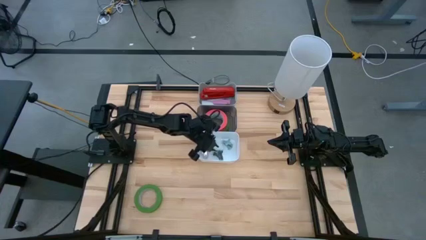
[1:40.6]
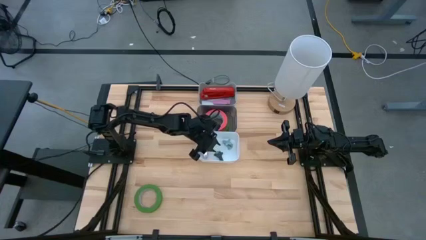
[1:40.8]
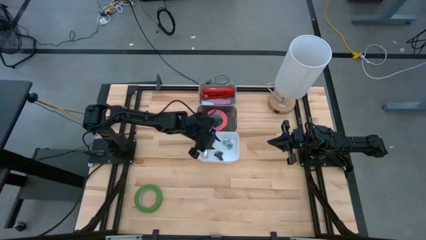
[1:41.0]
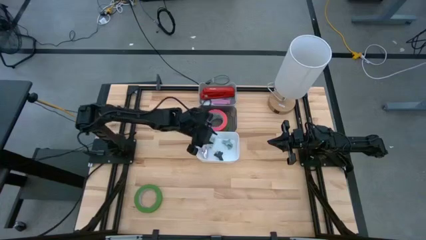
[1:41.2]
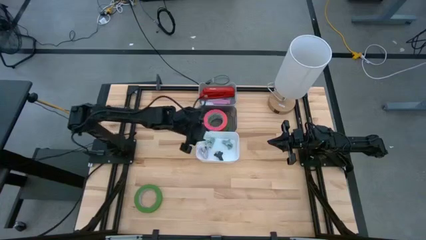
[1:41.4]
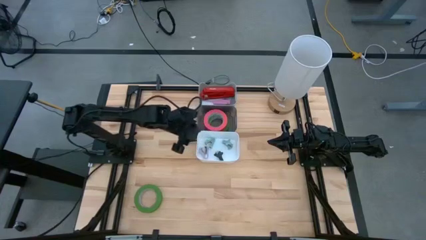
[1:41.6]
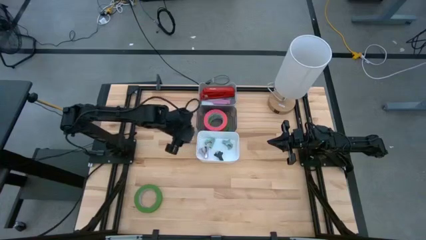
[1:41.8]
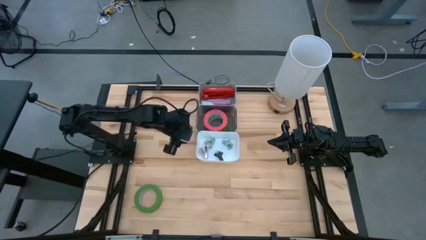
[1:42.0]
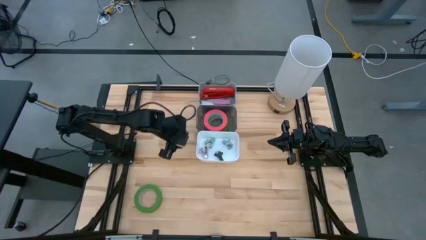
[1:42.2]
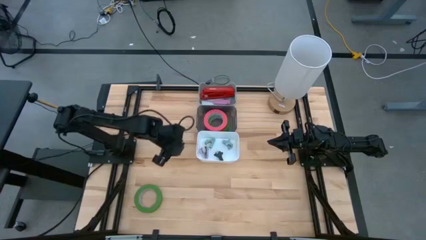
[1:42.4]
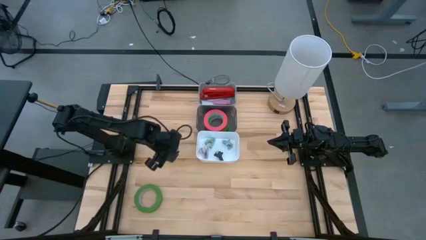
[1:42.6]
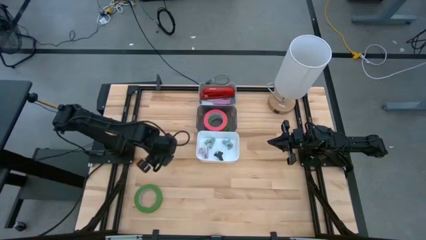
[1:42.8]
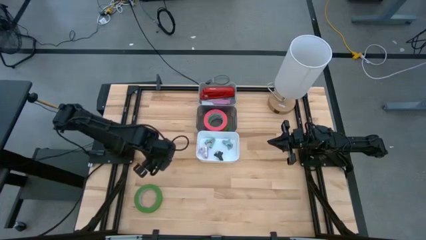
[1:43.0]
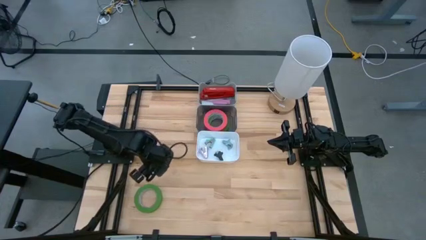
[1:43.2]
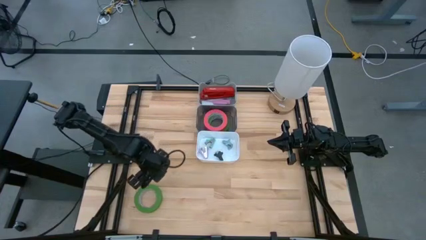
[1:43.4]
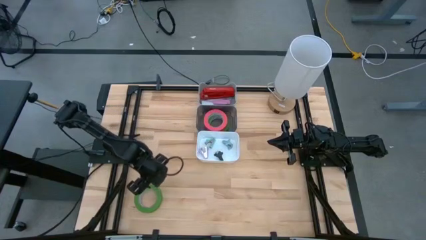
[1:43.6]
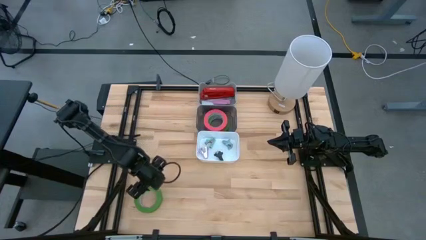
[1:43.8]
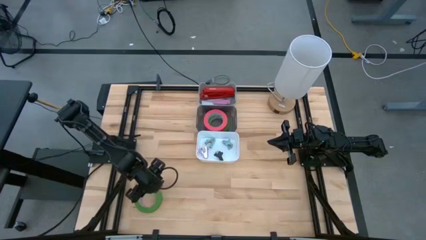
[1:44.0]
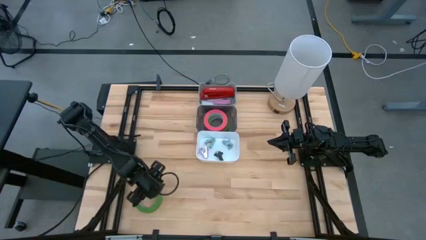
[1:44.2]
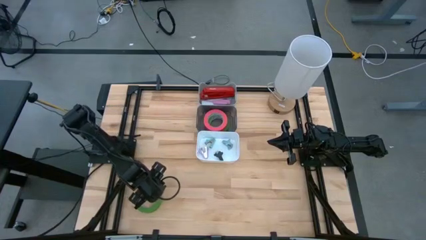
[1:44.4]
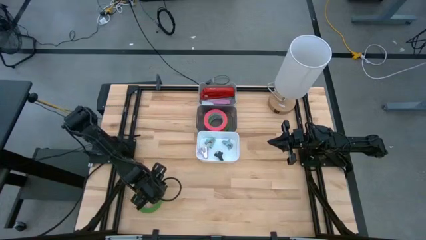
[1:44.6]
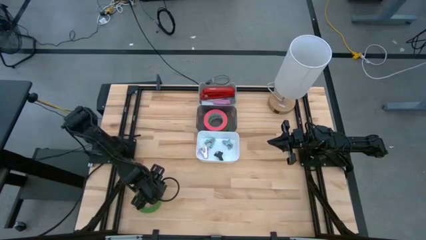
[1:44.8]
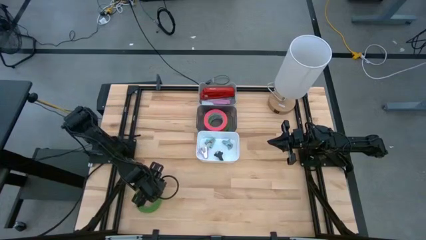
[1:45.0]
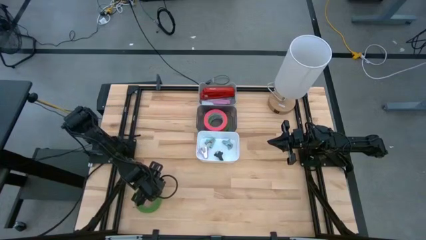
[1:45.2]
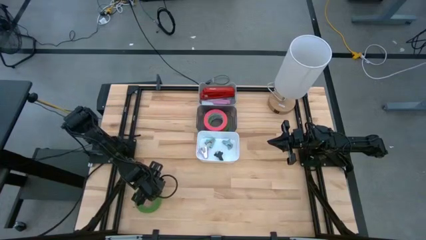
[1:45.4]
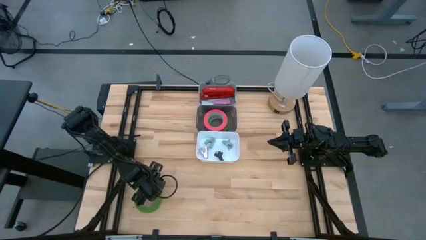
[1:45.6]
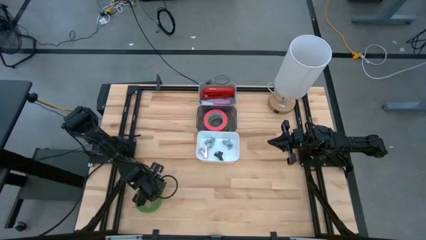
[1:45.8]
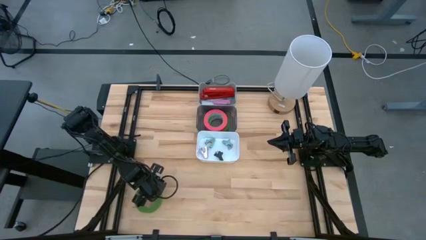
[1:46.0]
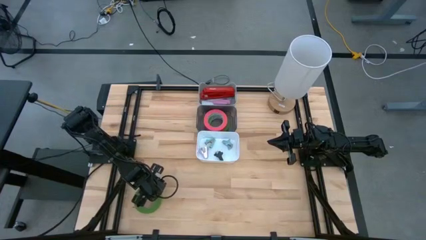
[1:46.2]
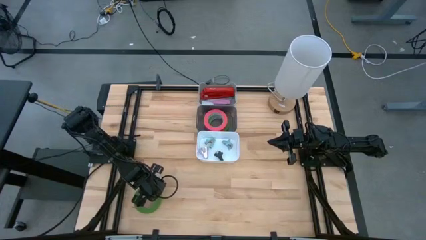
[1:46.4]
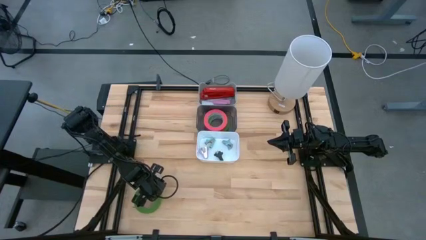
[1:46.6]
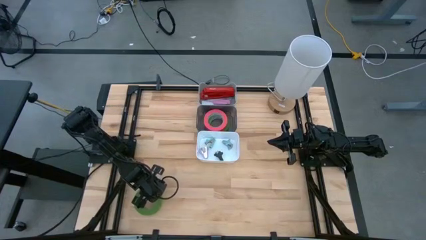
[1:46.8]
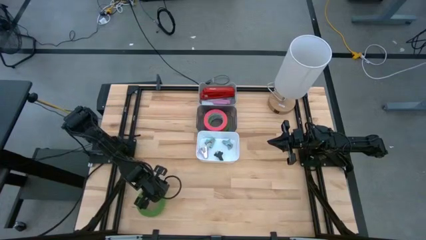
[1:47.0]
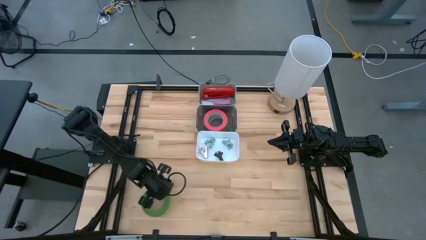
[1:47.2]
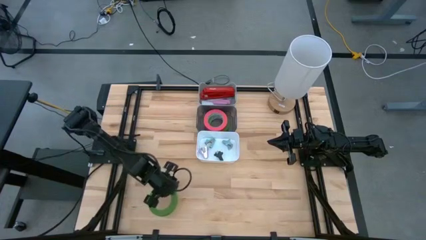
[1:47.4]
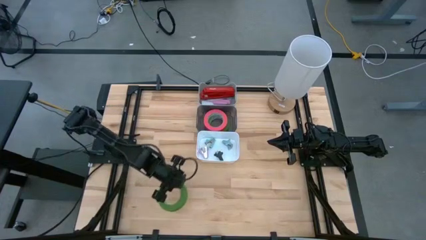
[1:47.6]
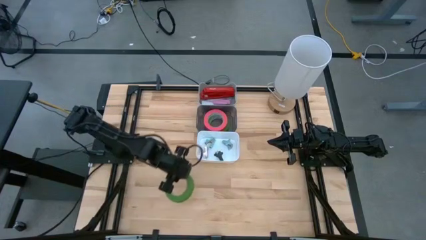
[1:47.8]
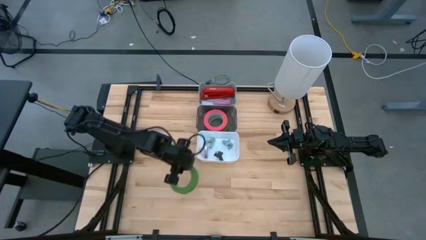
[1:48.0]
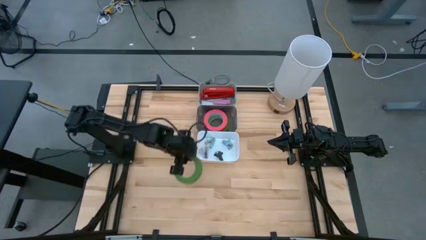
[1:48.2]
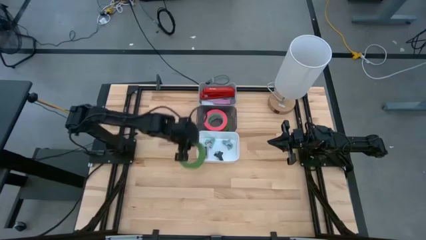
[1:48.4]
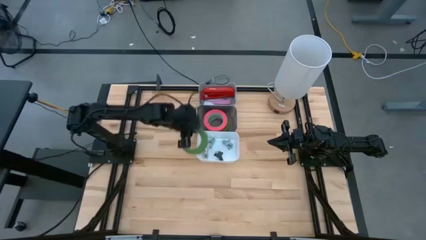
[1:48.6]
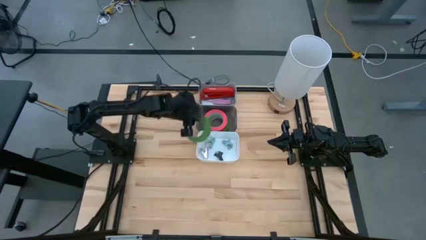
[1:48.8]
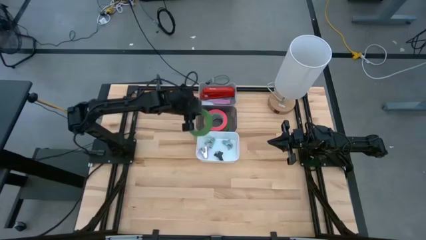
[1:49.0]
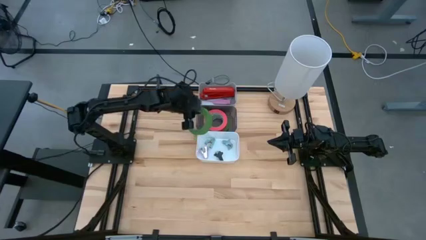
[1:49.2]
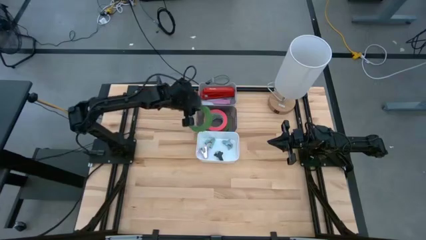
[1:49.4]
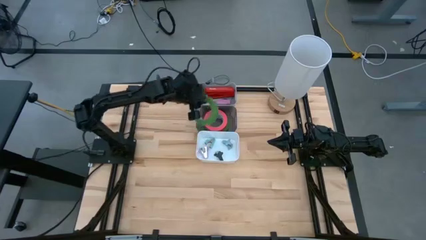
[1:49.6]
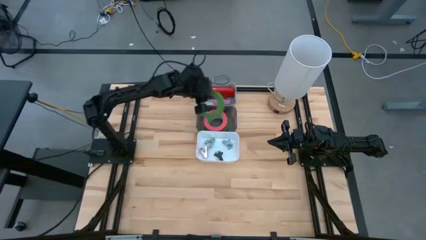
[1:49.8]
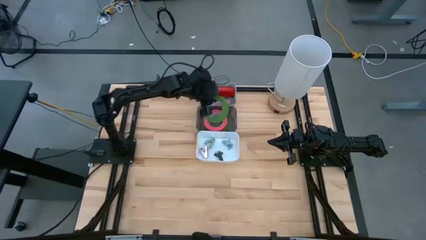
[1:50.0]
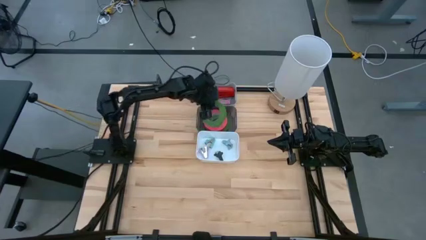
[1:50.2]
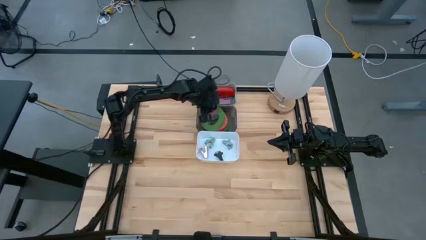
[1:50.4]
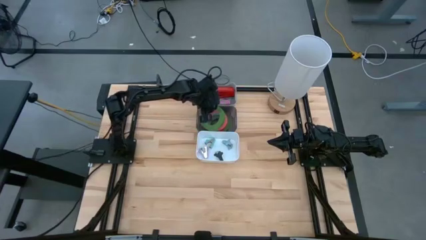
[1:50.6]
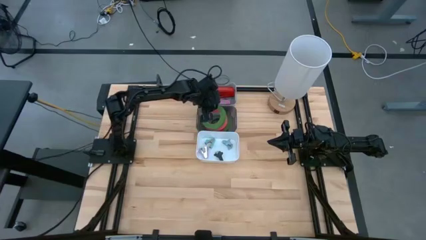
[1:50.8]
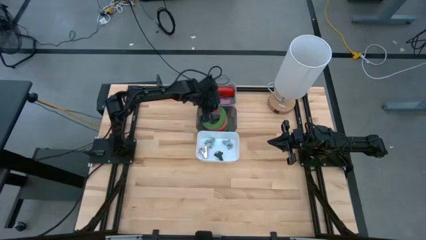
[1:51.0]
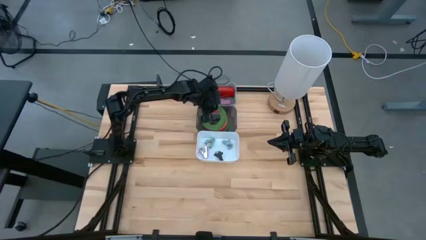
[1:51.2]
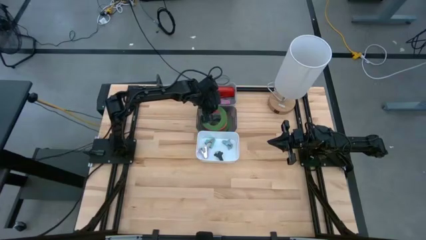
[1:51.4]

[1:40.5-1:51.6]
Task: Pick and place Stapler, Stapler remover, tape
Put the green tape in the black bin
